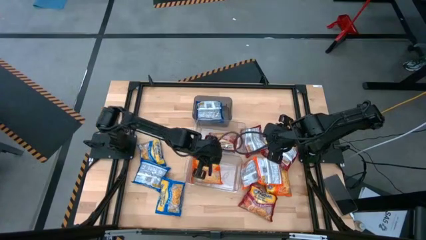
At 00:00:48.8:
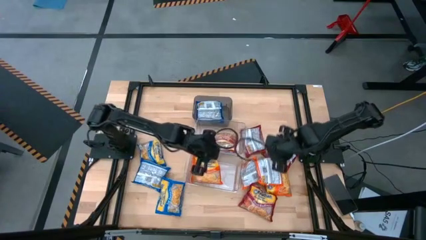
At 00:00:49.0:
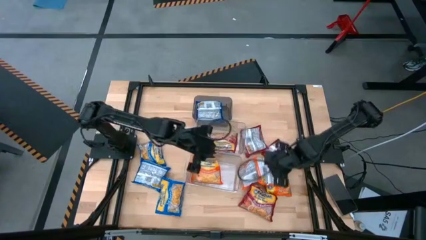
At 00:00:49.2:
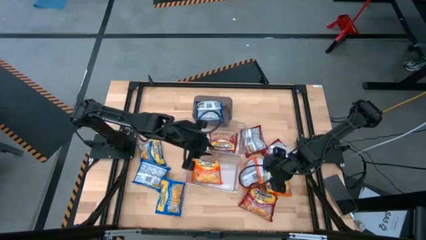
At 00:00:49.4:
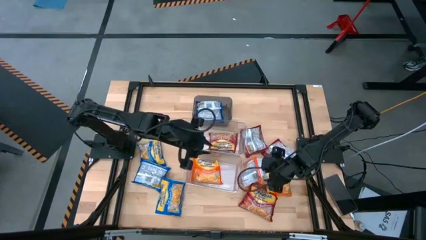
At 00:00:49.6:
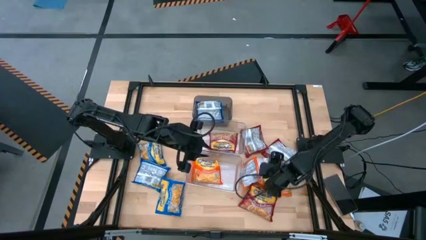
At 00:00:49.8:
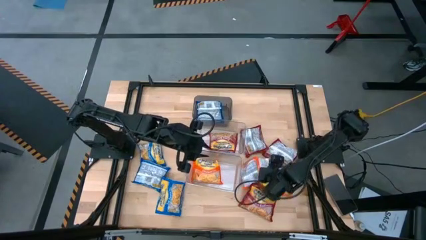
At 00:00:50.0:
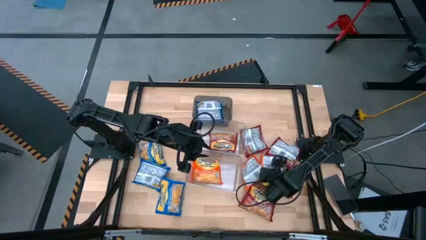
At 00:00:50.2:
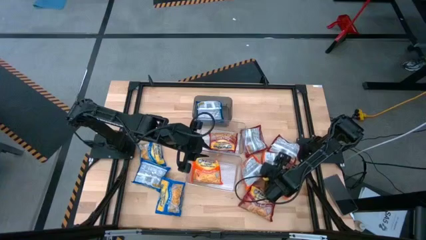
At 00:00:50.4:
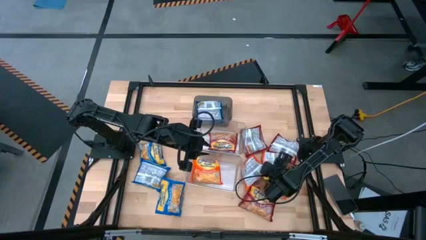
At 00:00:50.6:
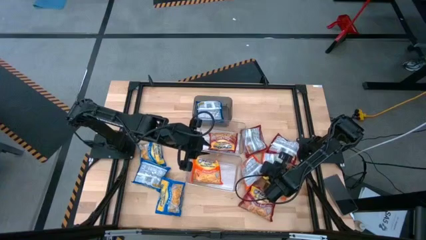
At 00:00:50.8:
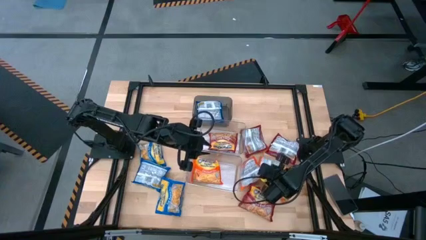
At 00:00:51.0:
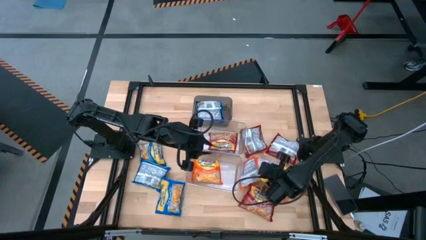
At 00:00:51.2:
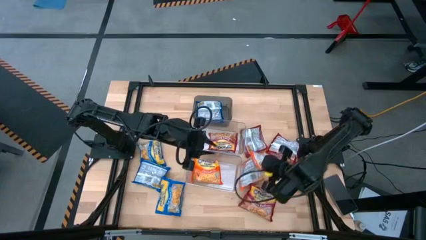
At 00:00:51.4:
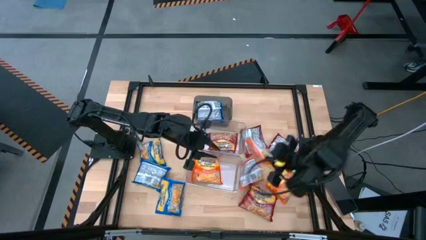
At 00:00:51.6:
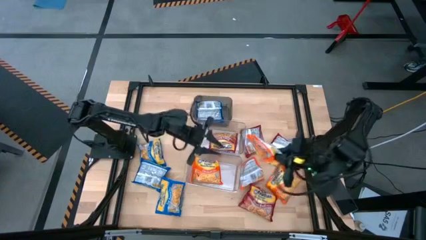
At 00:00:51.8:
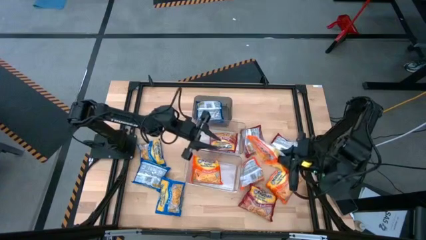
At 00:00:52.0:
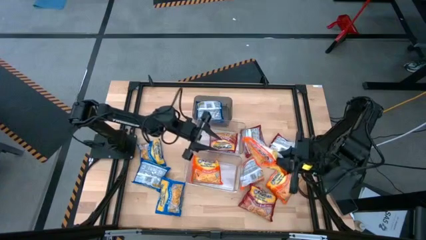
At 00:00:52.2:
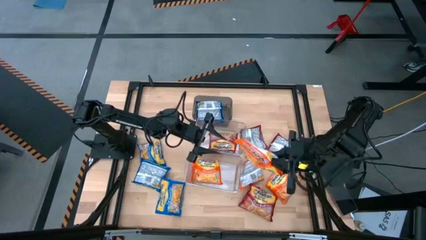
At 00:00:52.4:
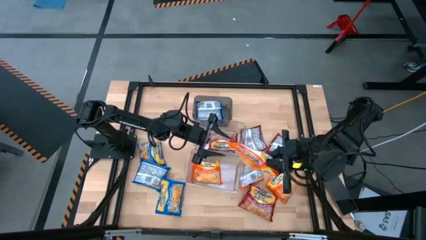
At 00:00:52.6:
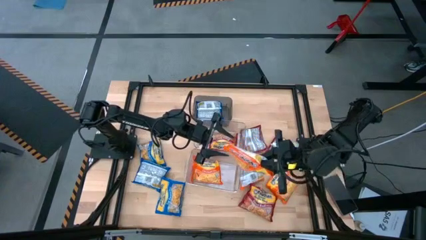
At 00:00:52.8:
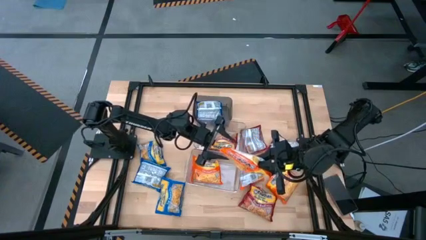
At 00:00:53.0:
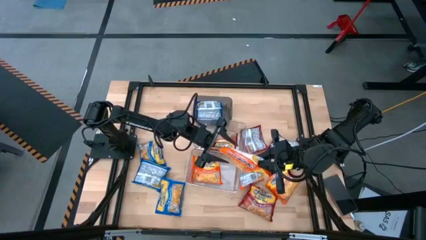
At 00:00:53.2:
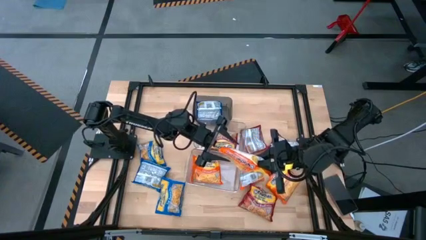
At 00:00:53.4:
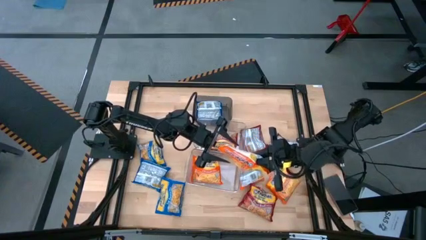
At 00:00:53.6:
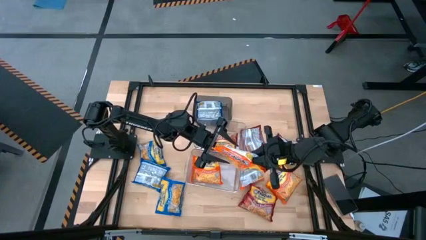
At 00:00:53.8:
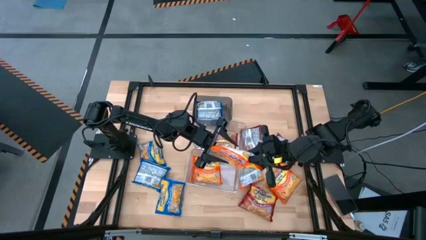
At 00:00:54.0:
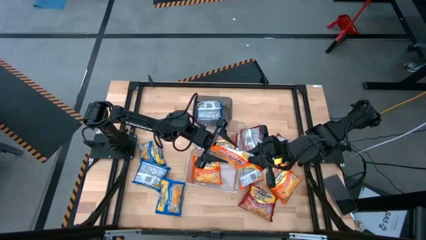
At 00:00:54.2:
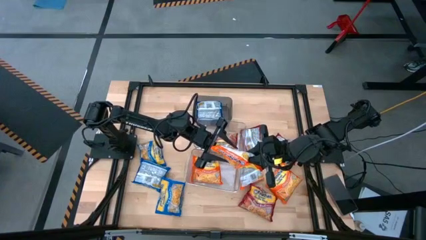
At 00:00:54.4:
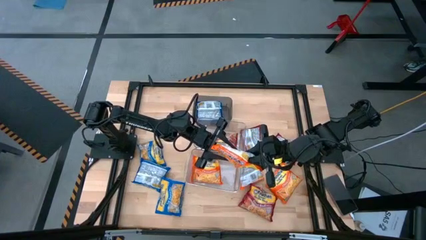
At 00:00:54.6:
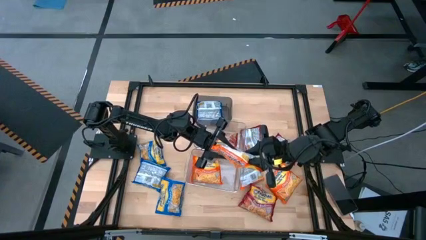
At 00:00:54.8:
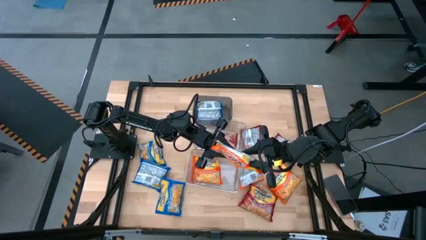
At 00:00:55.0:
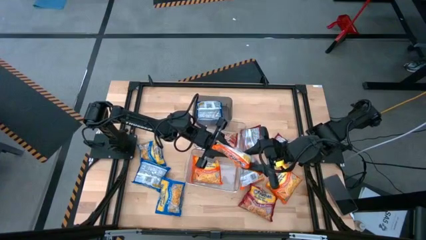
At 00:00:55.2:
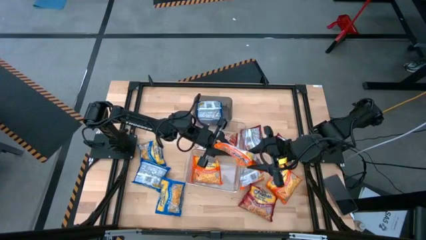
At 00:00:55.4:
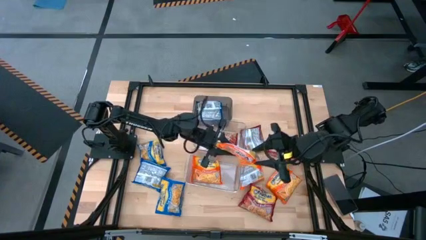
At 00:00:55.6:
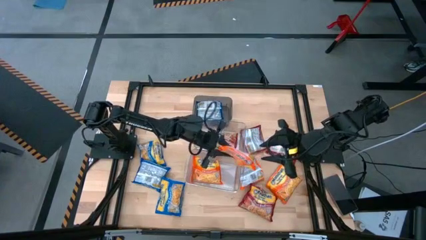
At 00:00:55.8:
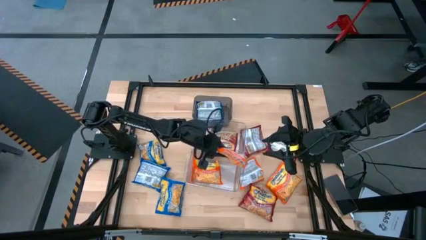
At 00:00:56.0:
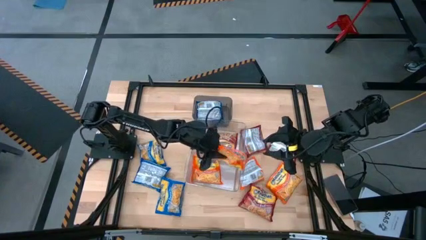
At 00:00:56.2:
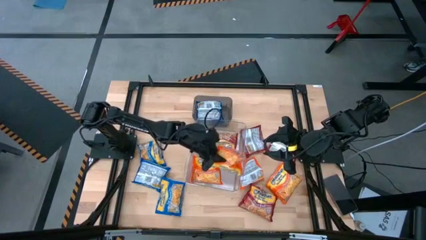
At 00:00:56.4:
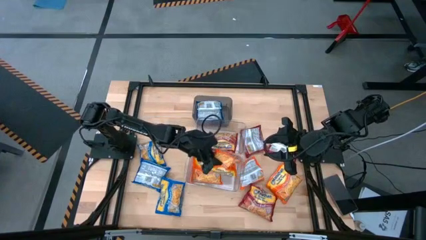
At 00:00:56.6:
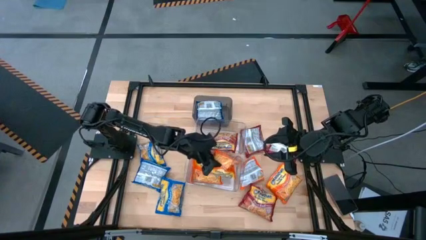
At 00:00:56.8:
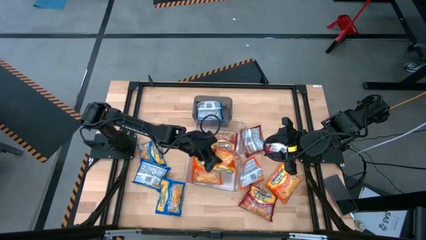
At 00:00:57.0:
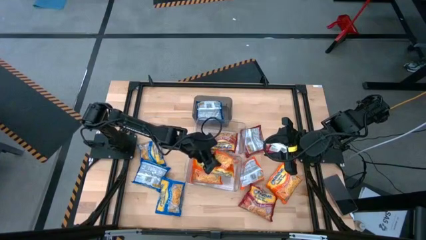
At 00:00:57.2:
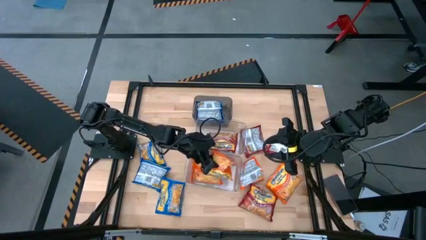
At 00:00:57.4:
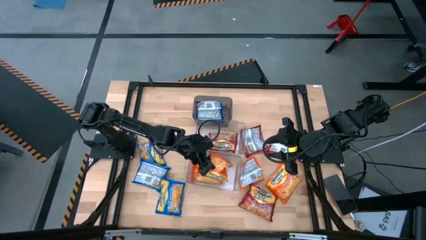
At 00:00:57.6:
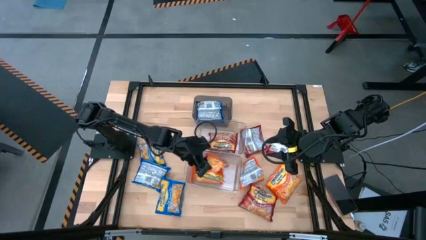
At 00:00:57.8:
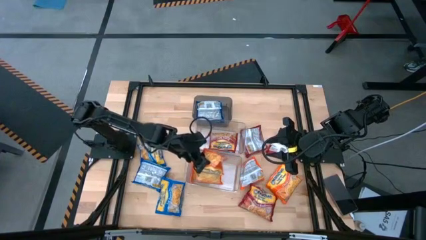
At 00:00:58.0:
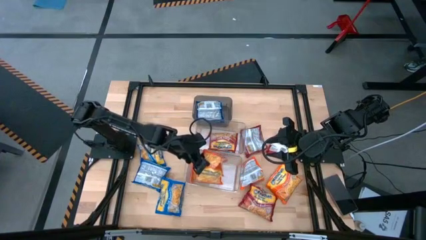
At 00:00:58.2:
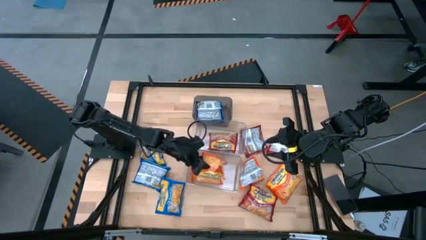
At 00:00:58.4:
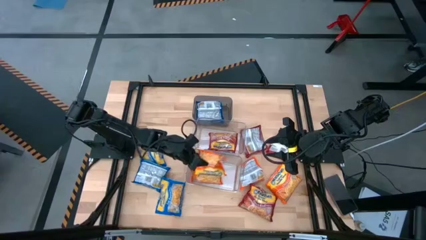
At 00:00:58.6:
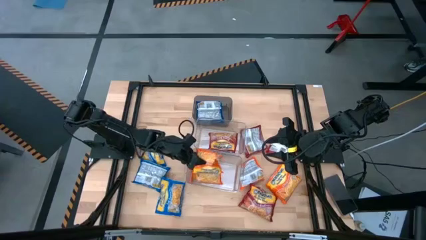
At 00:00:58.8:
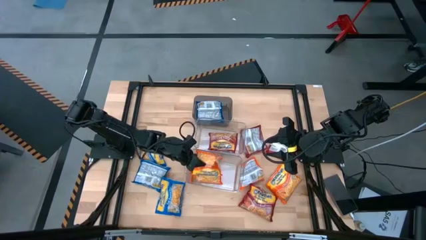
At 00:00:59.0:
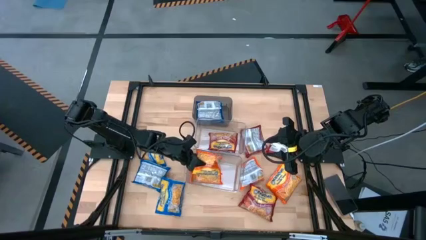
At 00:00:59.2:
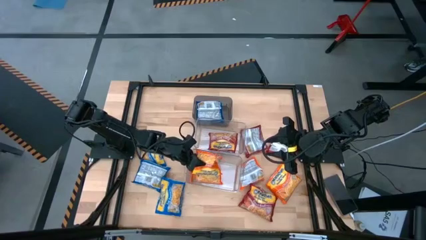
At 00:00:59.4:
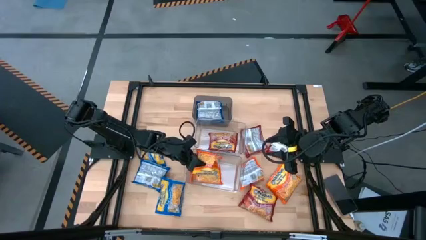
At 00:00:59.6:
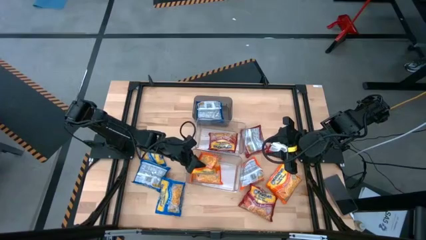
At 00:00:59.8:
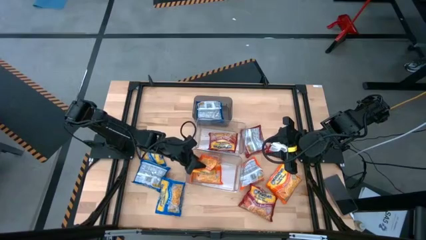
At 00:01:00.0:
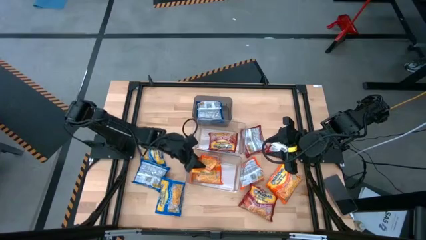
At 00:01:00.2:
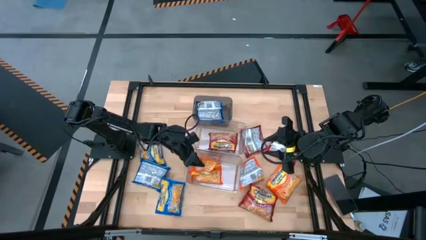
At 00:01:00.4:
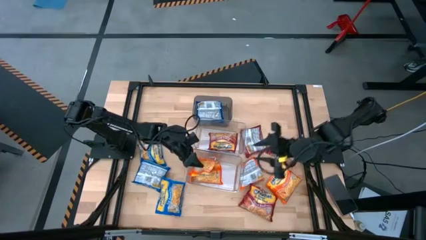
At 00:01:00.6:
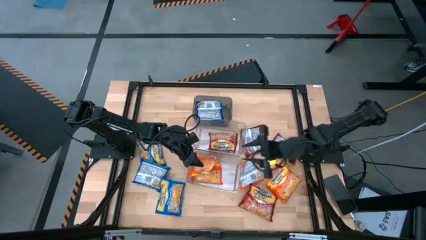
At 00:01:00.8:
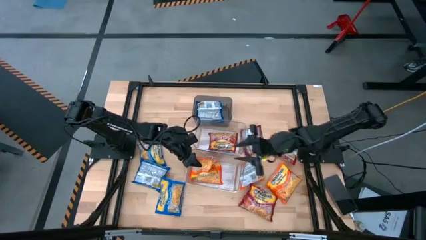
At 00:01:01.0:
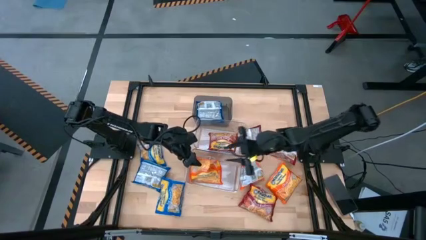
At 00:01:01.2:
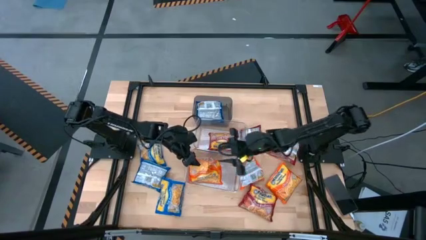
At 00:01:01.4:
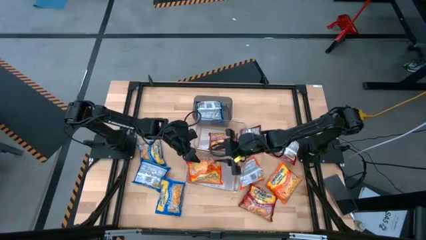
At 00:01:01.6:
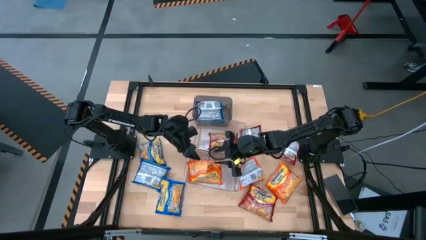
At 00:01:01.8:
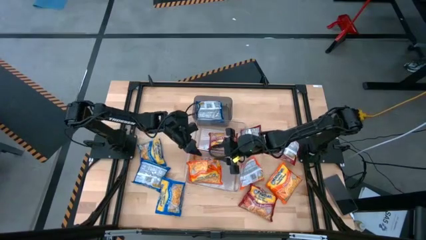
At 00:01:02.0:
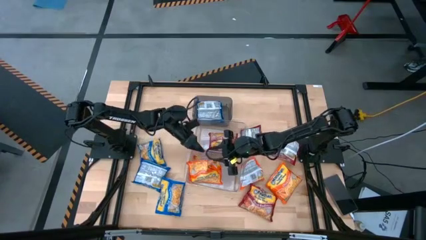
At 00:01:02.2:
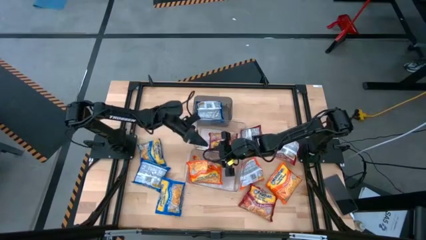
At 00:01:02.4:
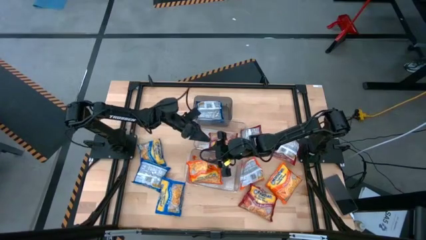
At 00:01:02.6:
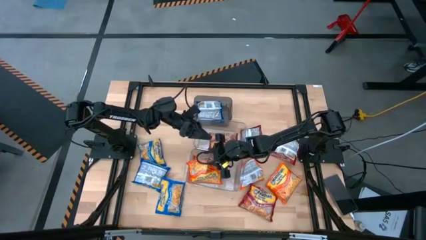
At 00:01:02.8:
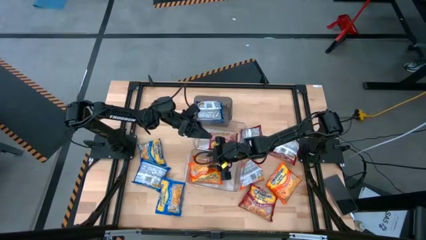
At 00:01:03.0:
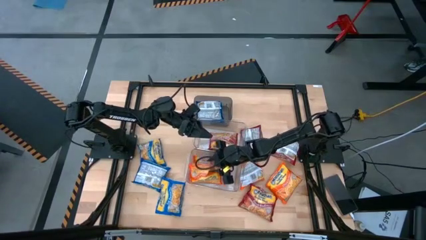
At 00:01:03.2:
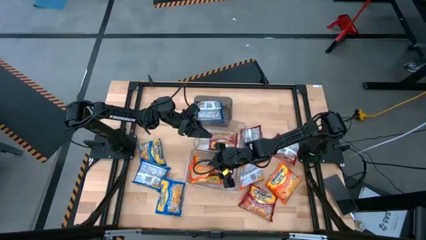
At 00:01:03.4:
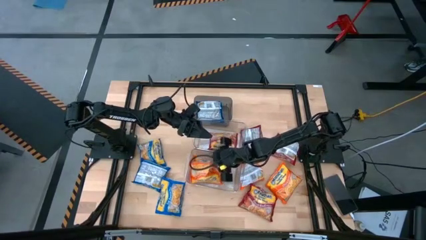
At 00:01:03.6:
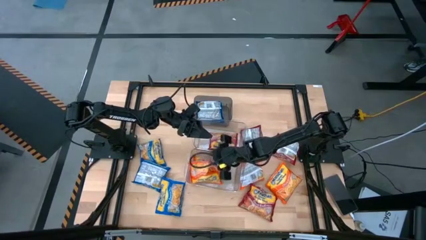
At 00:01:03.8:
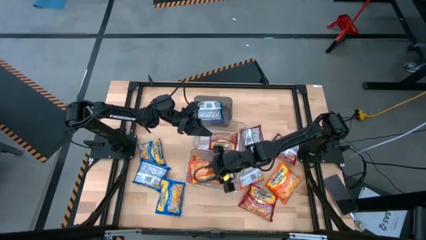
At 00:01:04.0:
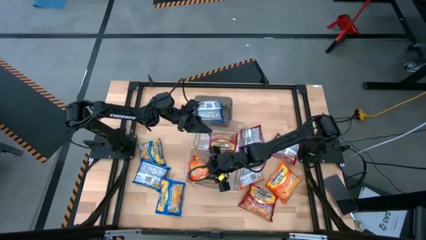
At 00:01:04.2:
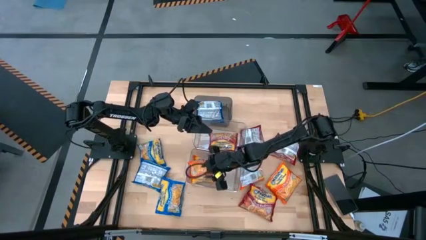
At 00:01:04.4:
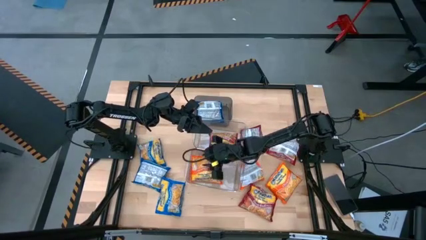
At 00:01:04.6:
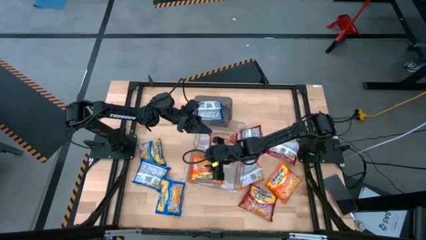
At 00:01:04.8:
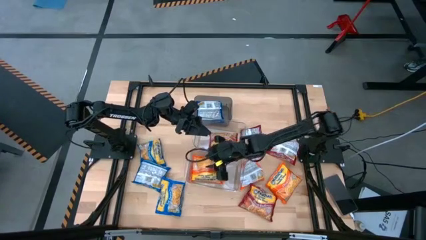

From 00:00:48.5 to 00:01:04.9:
Task: Sort Maruchan noodles
Put the middle orange noodle pack into the bottom transparent bin
